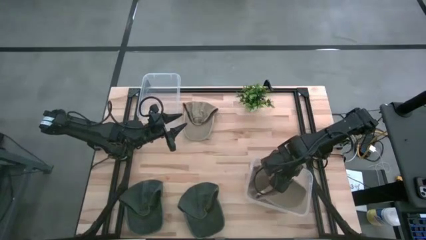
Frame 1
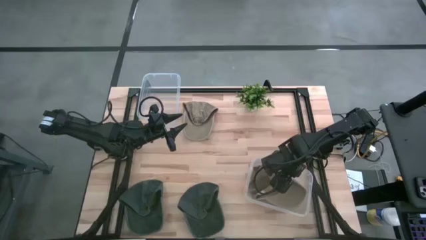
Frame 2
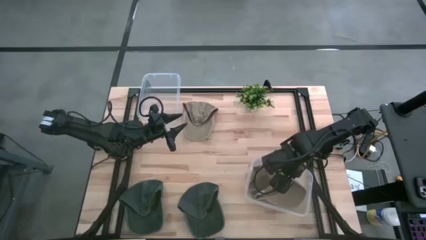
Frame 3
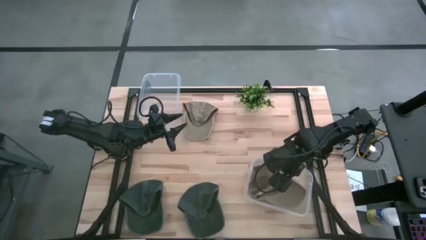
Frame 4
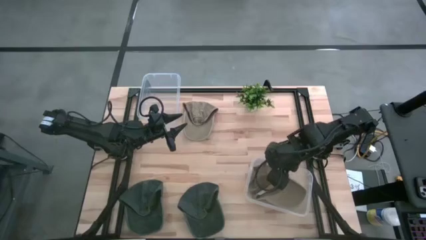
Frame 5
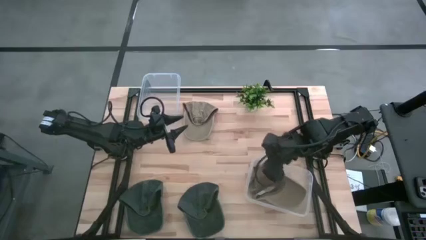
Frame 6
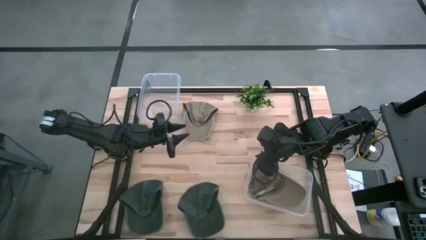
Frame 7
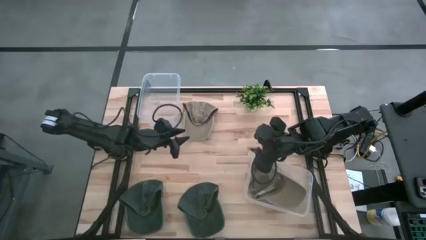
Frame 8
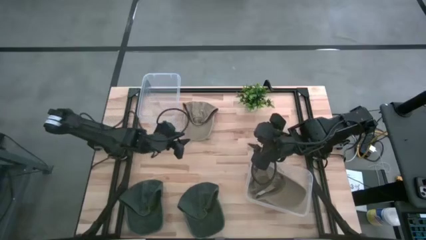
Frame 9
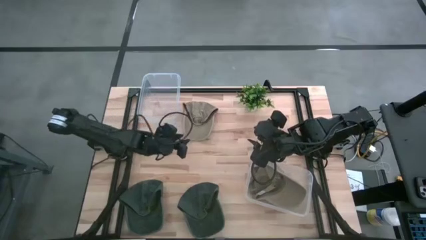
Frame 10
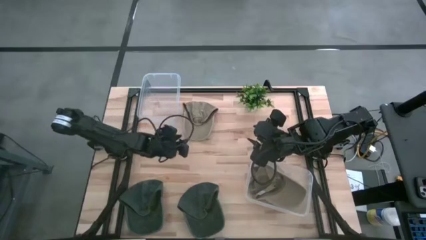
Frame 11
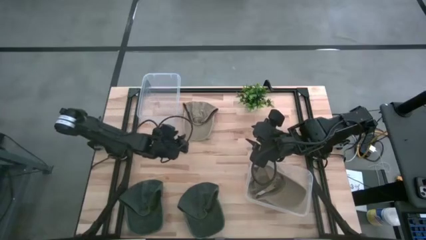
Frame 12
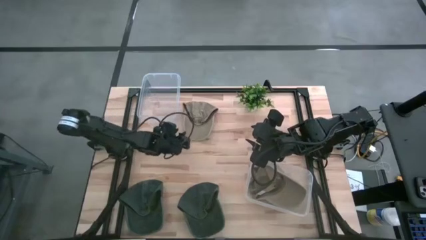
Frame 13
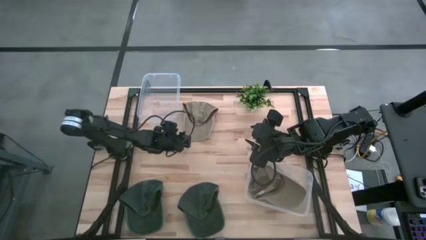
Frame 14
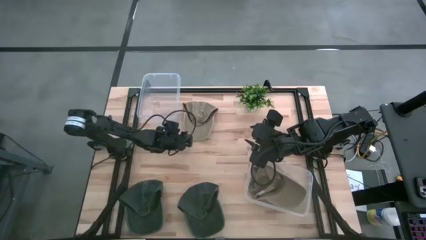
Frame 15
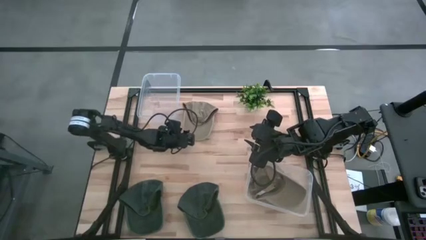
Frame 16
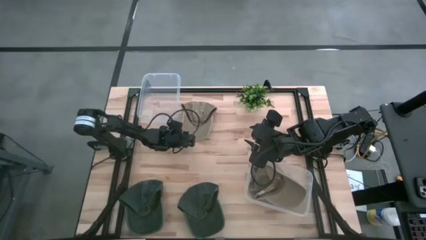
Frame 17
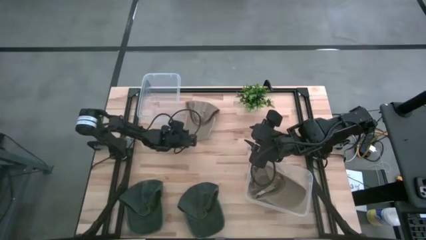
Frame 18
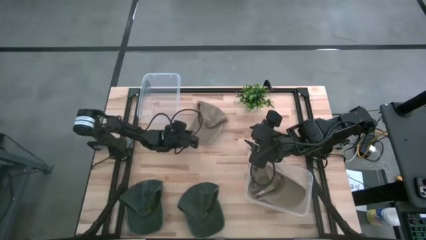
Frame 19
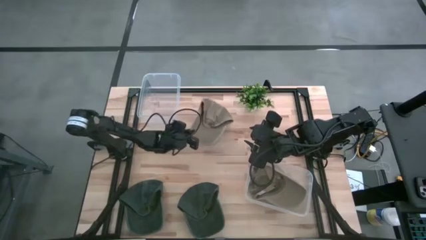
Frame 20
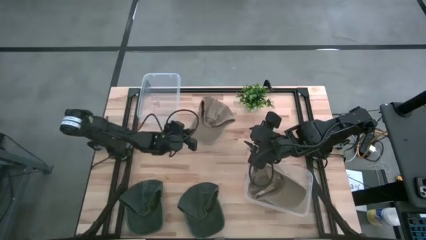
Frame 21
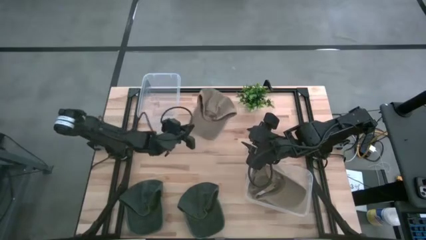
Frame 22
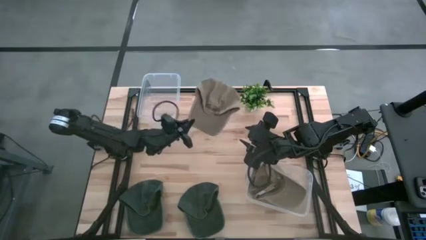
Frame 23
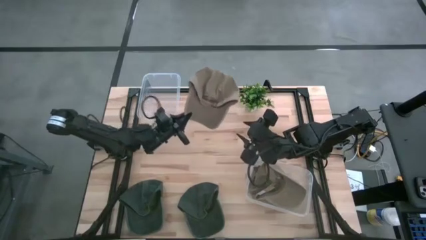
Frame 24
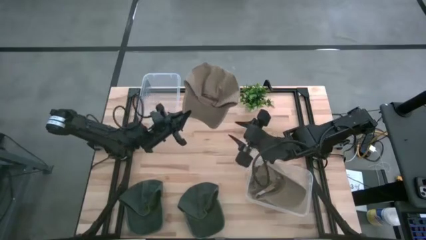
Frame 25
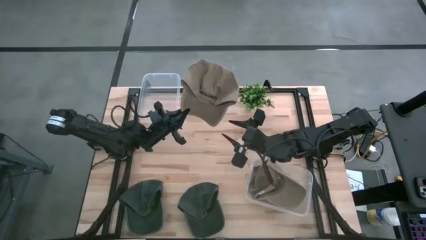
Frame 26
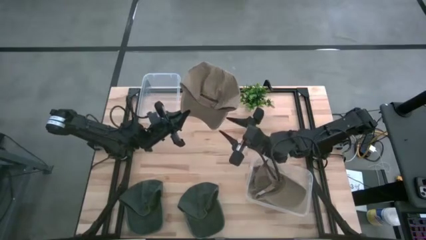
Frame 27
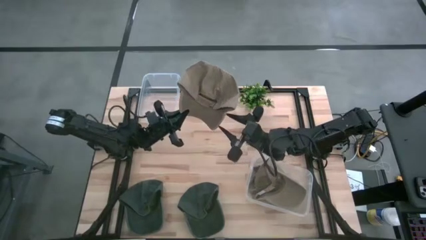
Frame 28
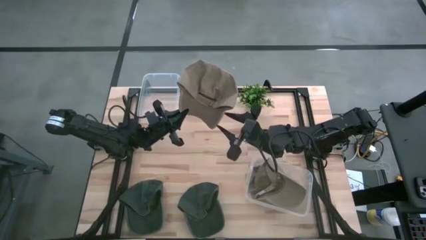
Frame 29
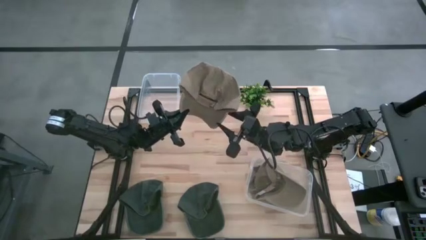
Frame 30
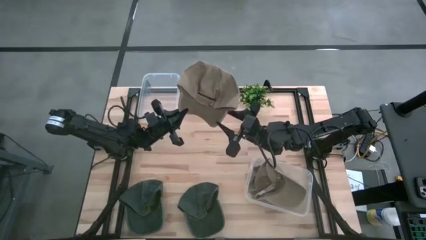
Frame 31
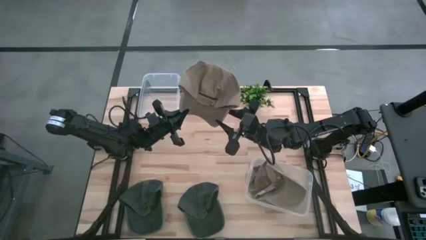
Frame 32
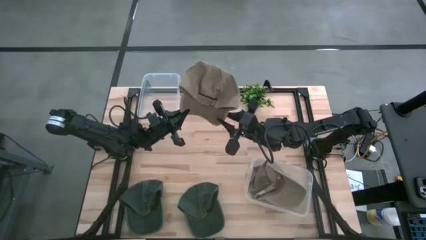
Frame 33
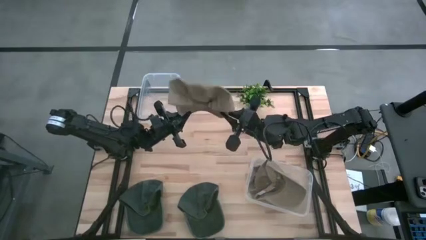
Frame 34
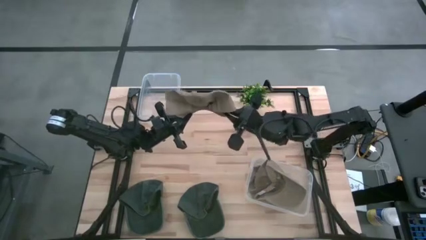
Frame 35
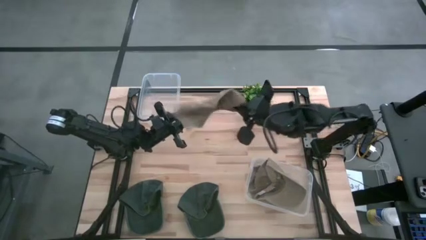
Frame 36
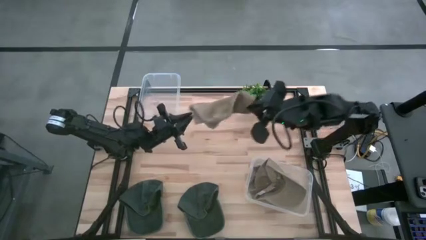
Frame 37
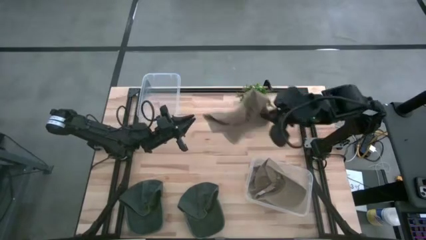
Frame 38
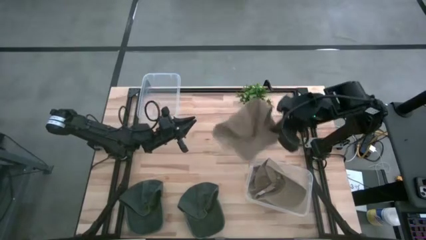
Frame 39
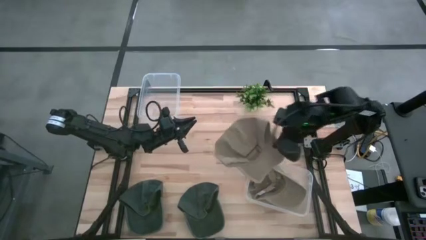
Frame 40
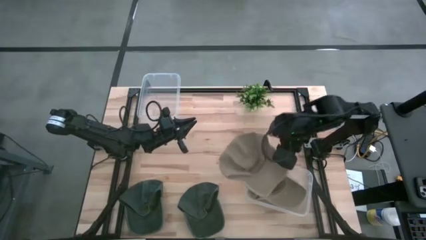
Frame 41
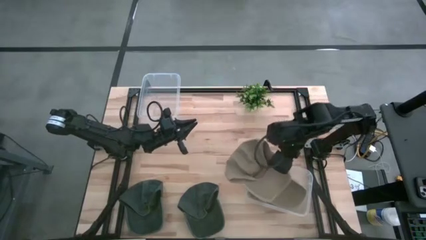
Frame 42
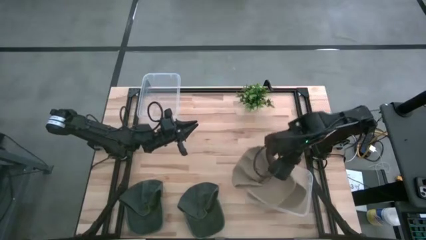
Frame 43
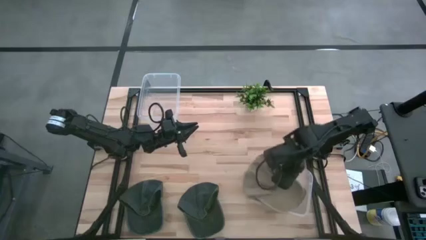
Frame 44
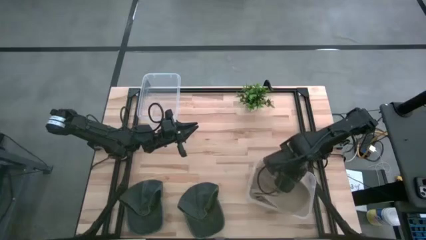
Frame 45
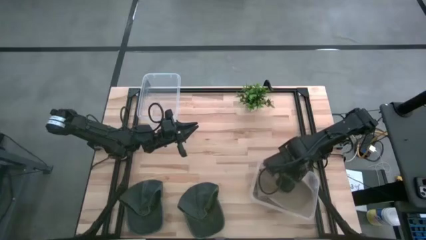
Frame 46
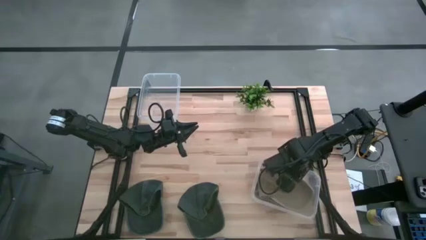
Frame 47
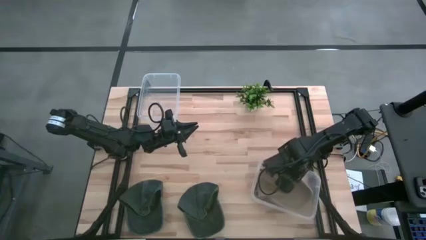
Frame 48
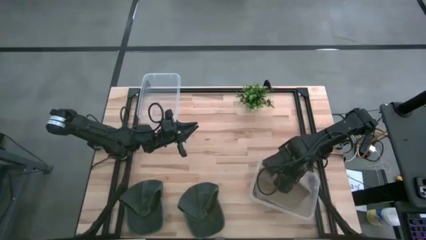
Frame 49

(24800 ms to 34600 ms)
Task: Pick & Place hat
Put the brown cap into the bottom transparent bin
